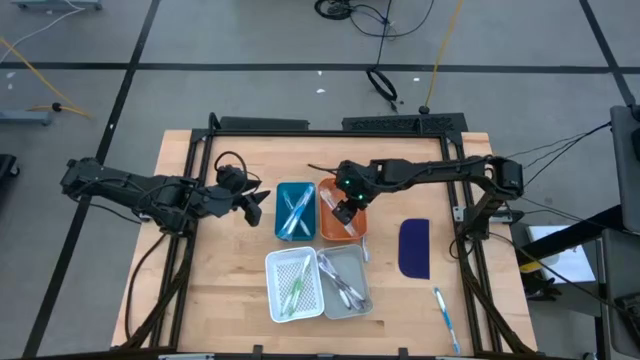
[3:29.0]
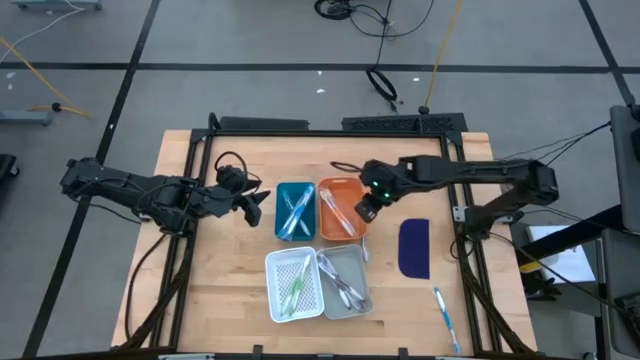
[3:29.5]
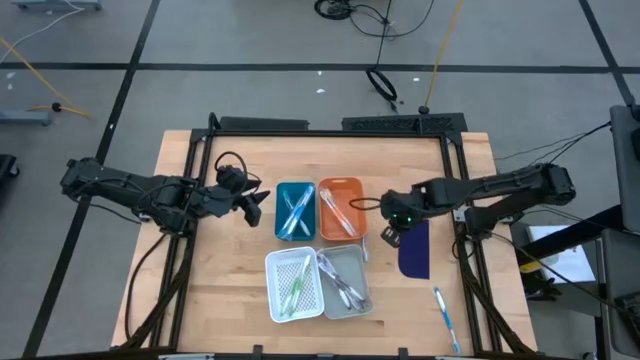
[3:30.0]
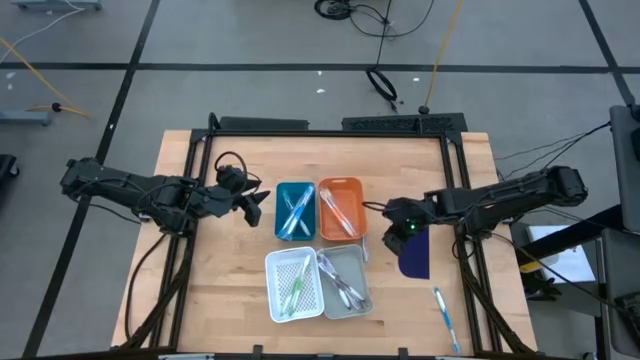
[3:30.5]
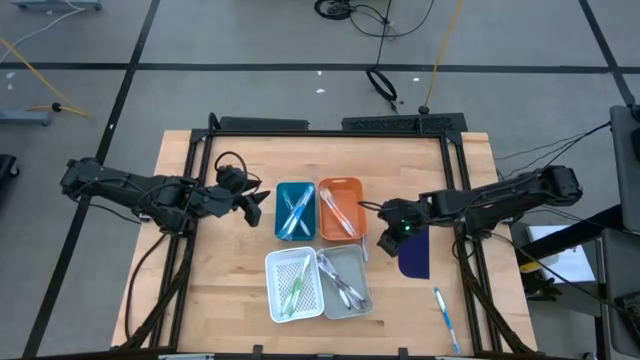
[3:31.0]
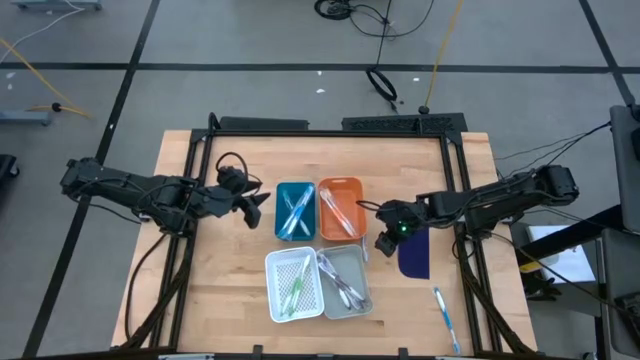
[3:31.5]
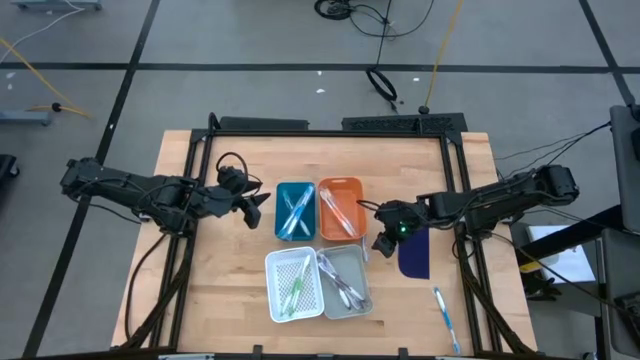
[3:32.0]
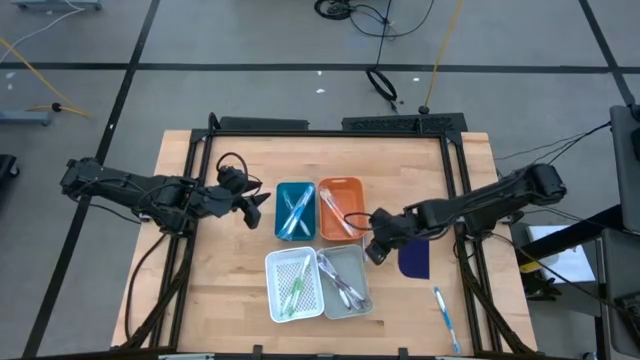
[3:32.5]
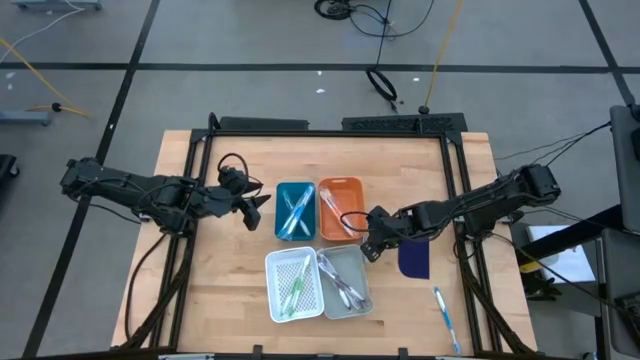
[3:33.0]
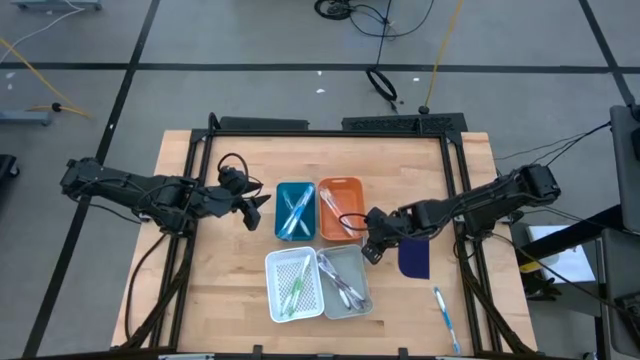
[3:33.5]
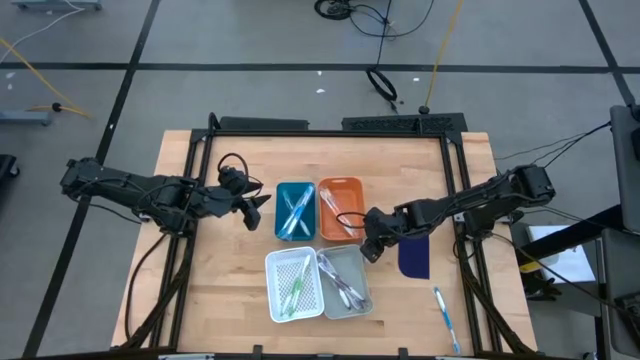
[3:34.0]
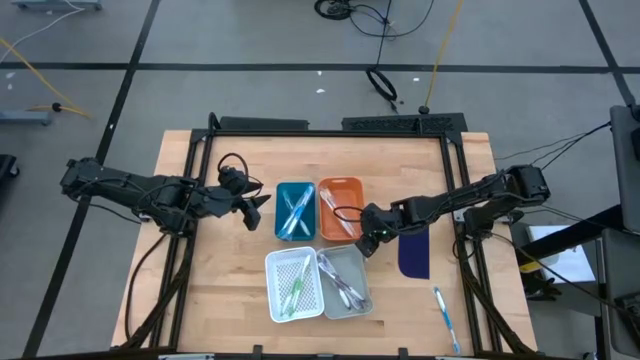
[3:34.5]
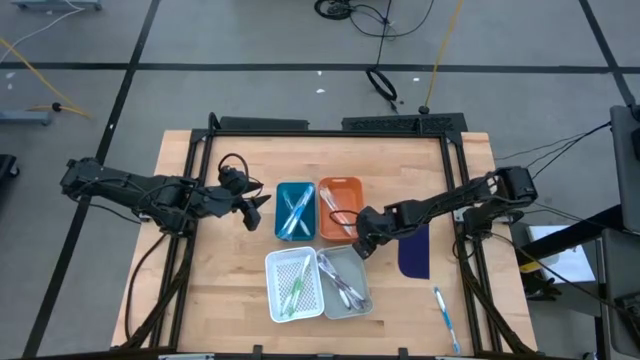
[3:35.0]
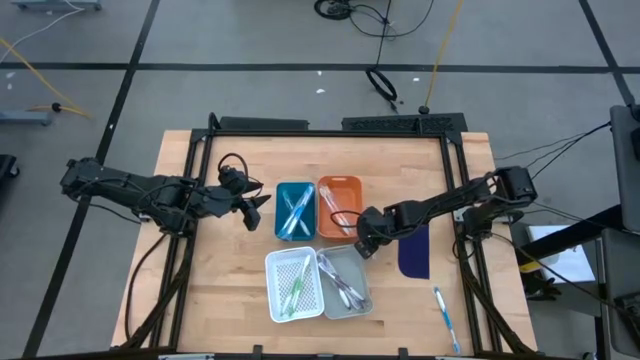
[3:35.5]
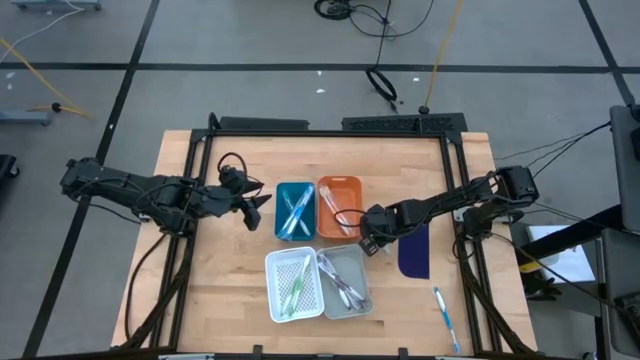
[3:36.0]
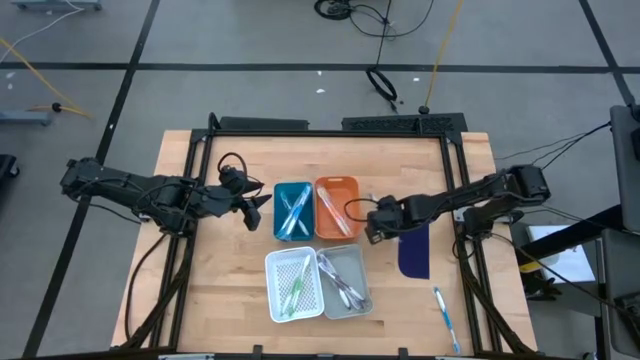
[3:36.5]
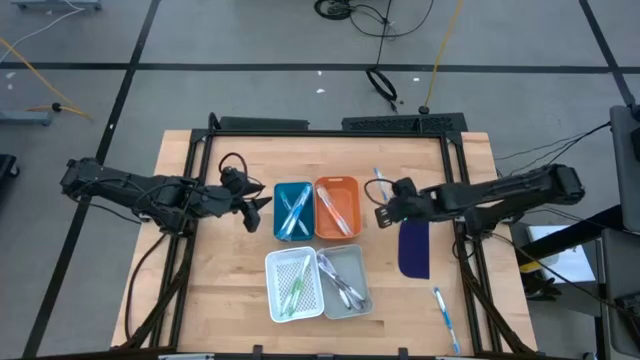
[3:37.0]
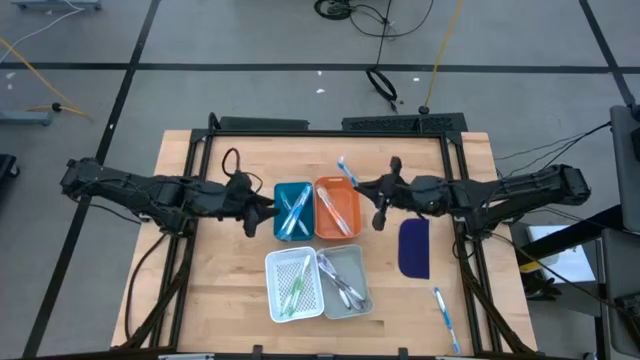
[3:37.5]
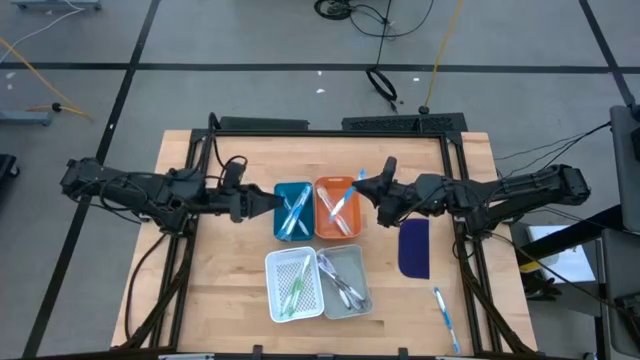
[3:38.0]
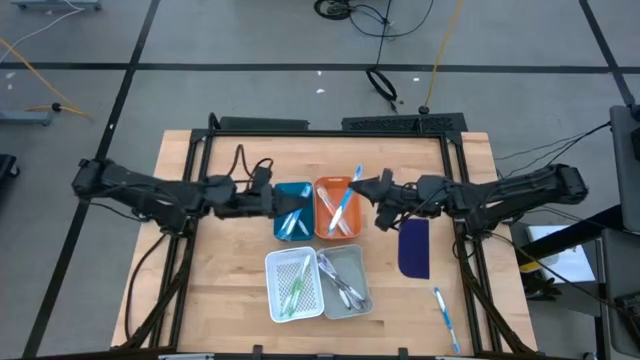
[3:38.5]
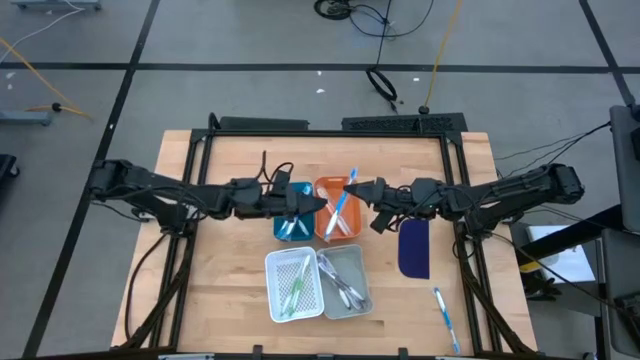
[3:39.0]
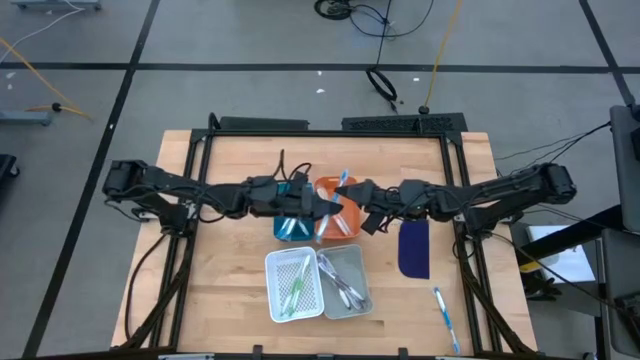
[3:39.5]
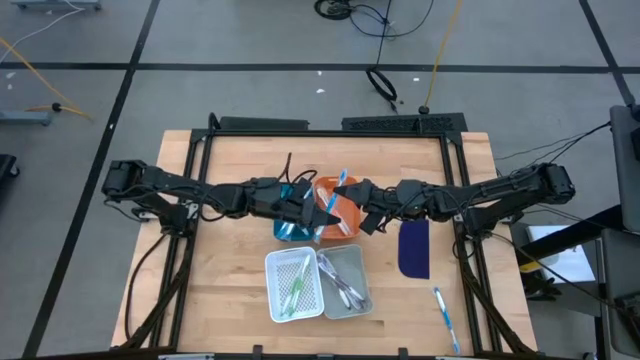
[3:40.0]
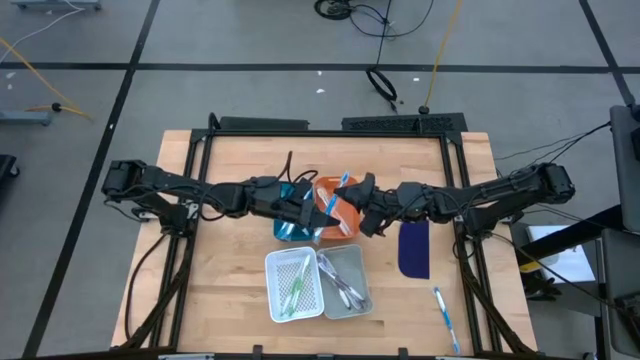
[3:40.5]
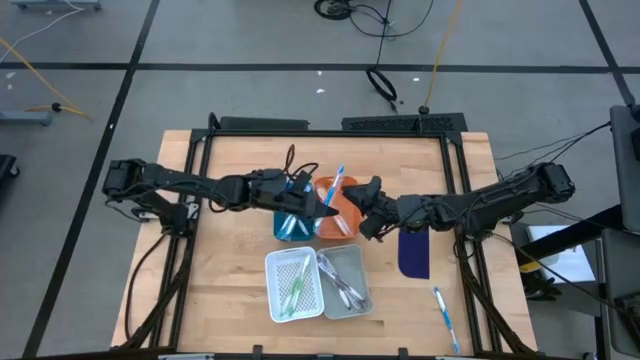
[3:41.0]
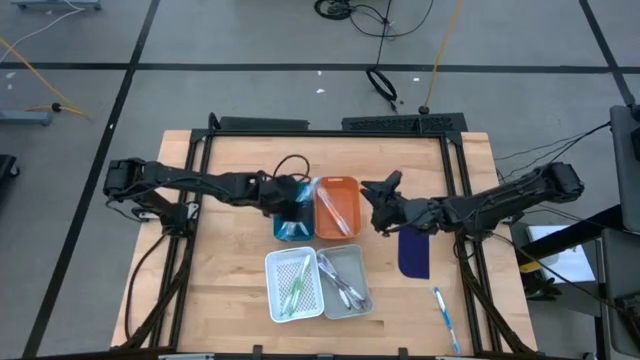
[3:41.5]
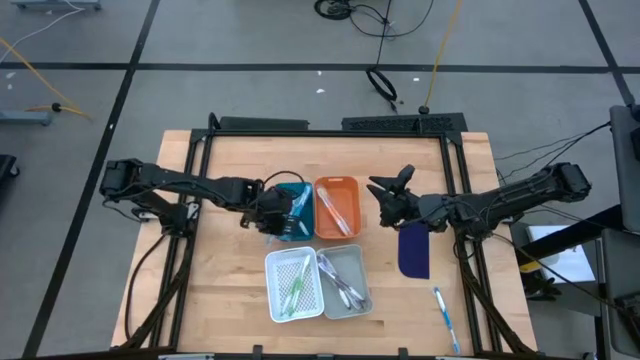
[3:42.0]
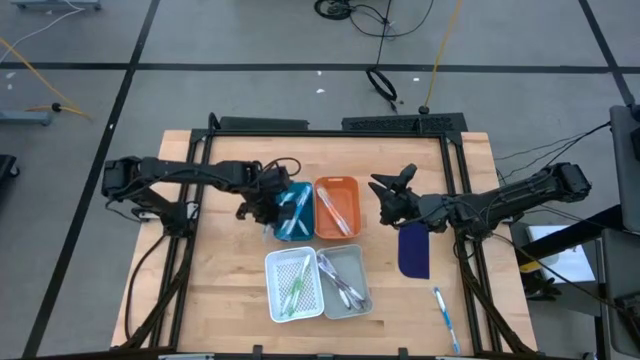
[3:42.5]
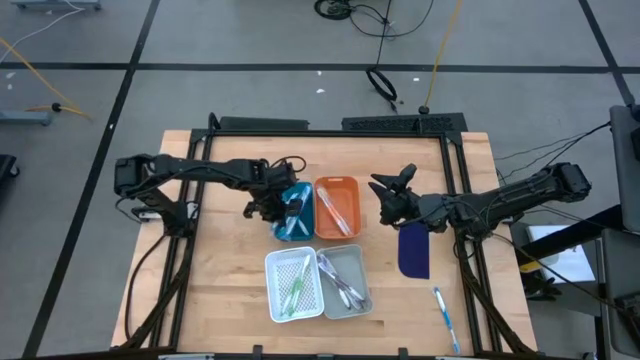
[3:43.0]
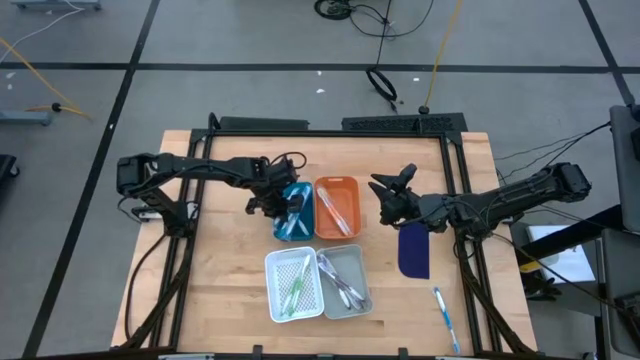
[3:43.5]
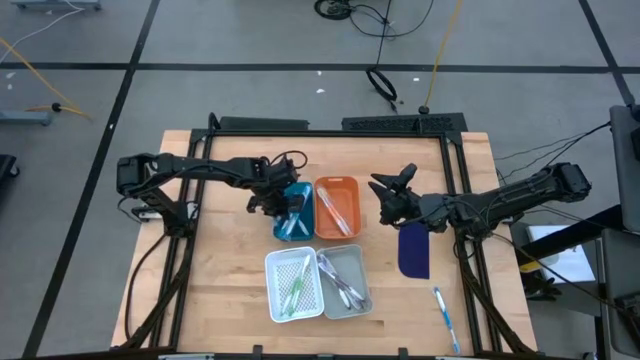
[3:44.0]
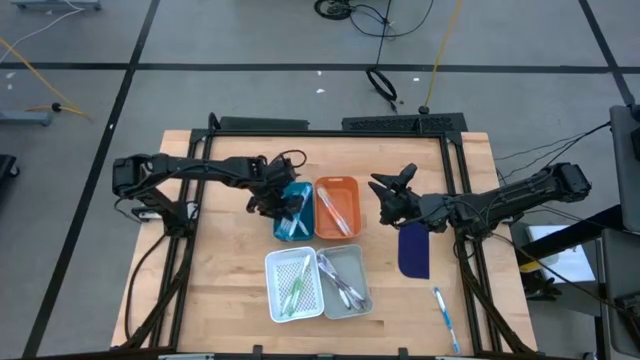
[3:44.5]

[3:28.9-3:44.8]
Task: Pick & Place Toothbrushes
Put the blue toothbrush into the blue bin

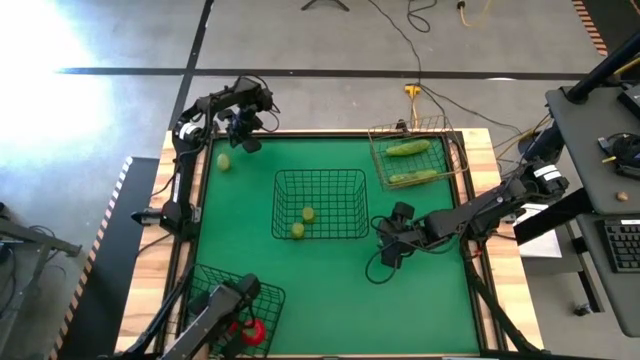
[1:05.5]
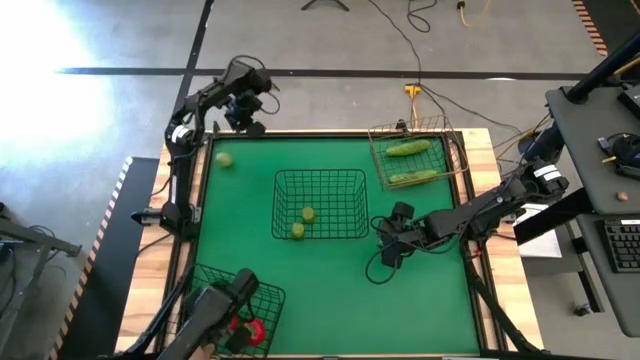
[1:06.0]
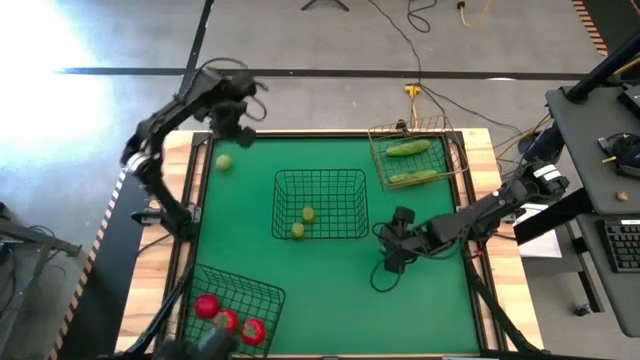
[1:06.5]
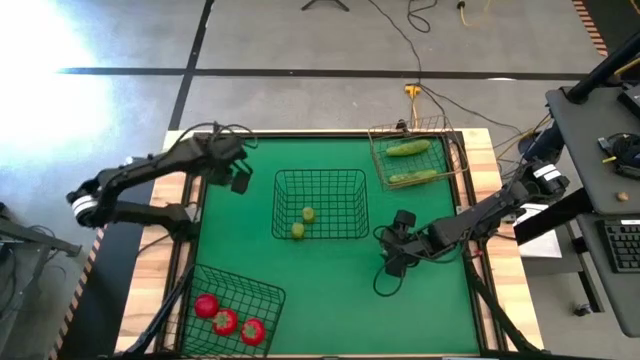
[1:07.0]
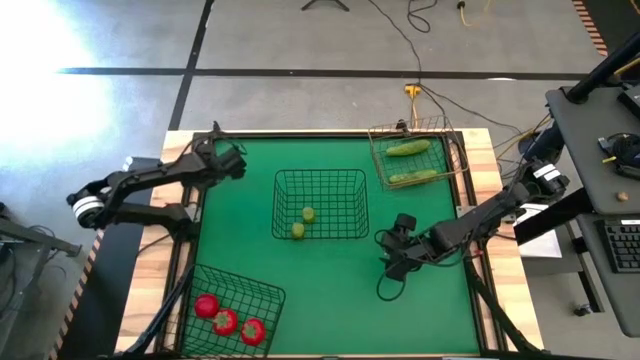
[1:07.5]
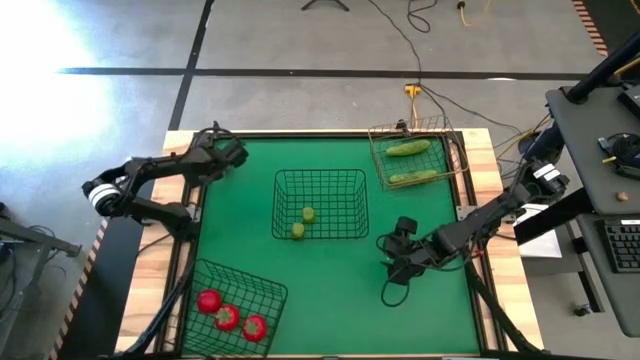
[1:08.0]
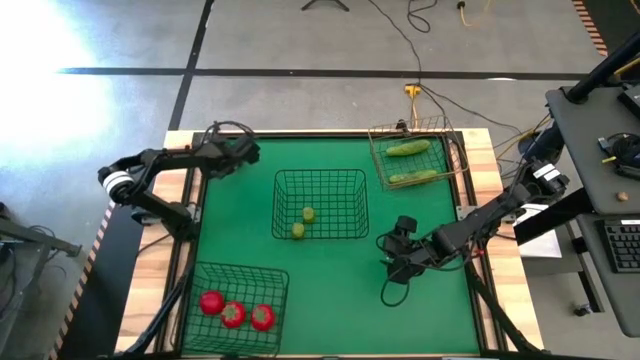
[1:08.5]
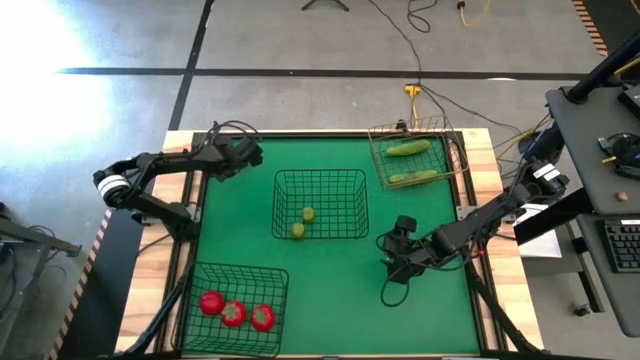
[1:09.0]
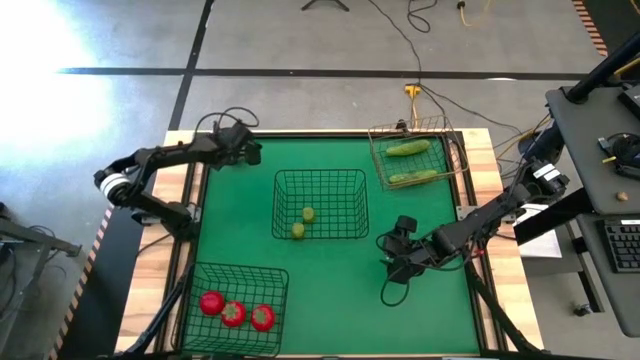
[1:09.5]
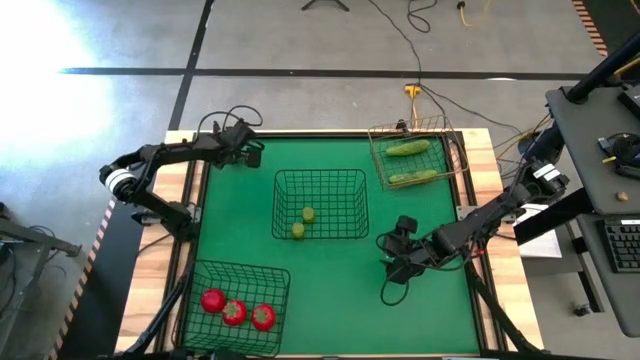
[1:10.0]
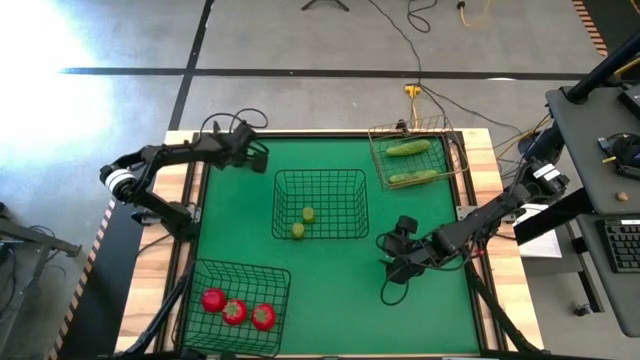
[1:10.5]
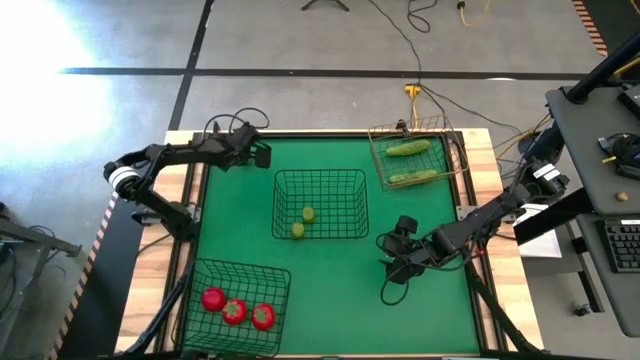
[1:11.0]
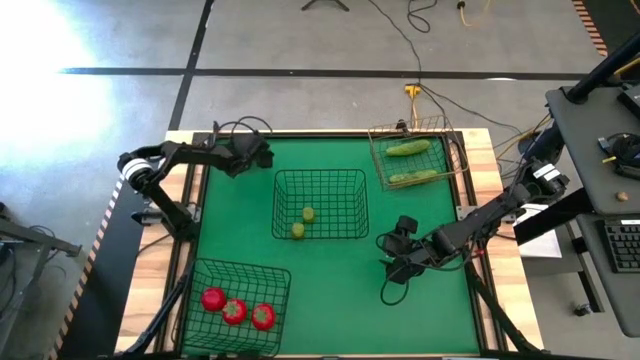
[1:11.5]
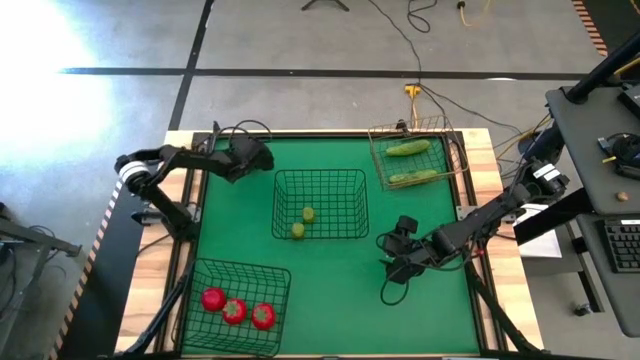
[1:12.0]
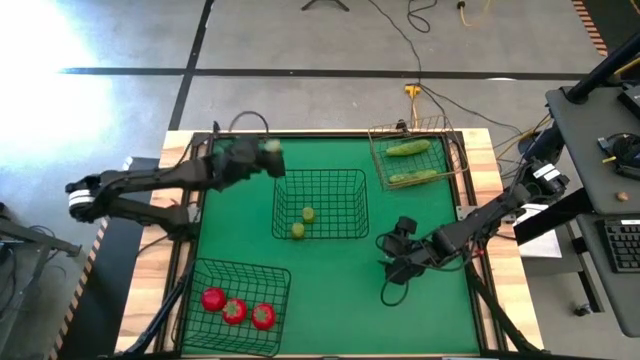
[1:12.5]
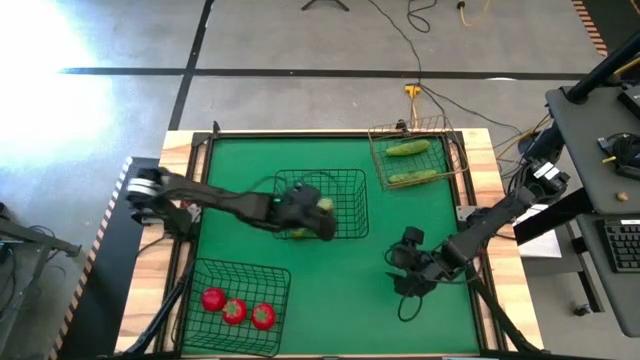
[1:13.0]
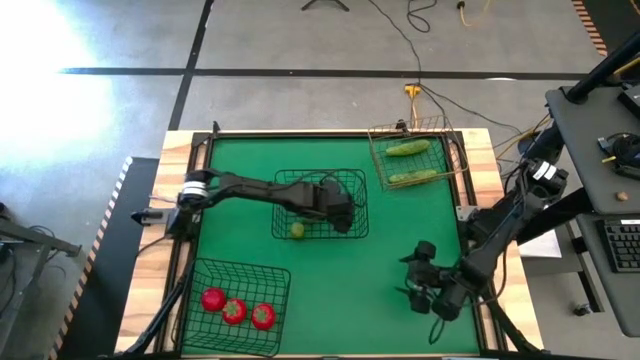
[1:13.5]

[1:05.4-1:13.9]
Task: Sort produce into baskets
Put the green lime into the top black wire basket
